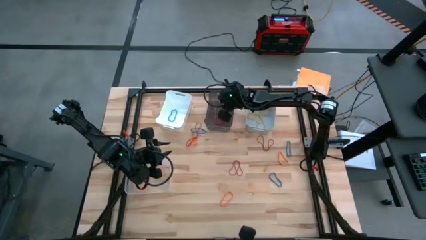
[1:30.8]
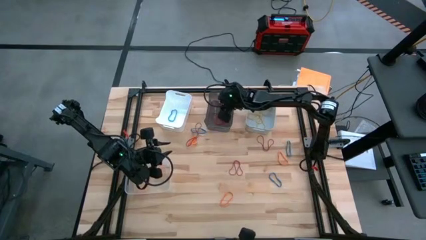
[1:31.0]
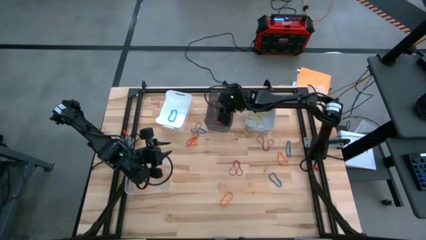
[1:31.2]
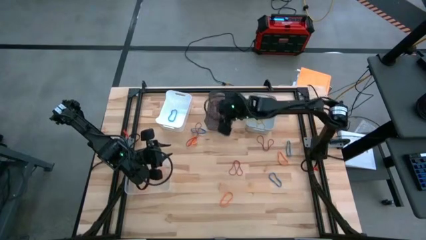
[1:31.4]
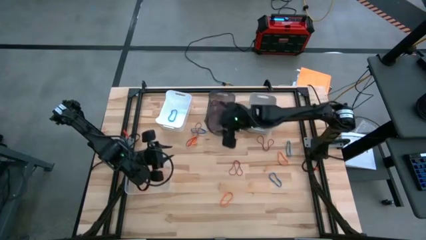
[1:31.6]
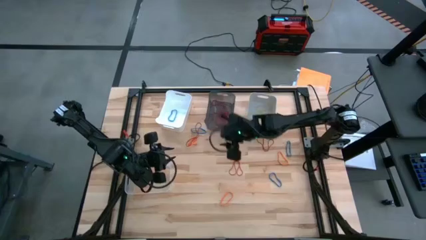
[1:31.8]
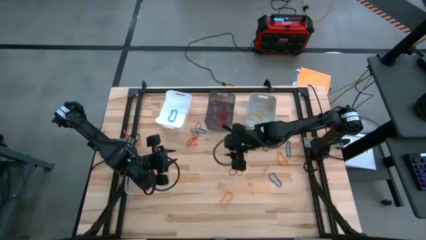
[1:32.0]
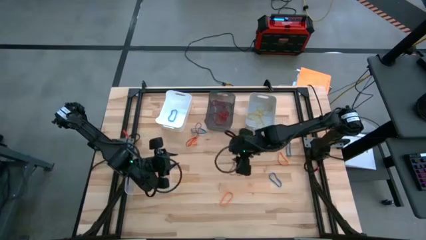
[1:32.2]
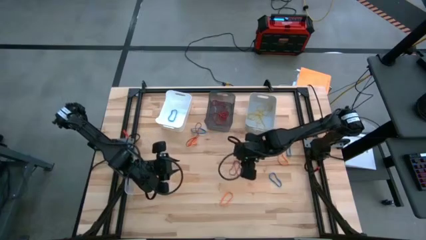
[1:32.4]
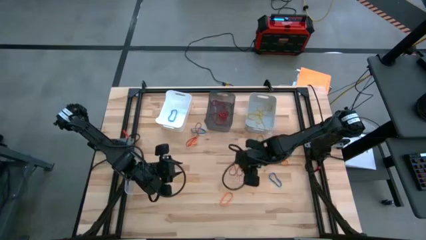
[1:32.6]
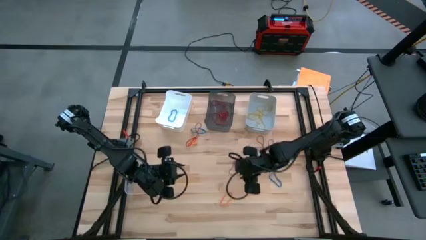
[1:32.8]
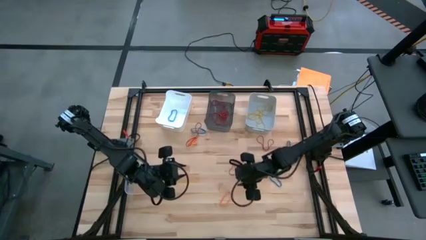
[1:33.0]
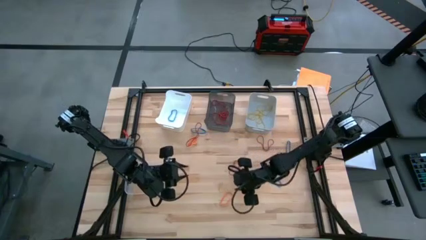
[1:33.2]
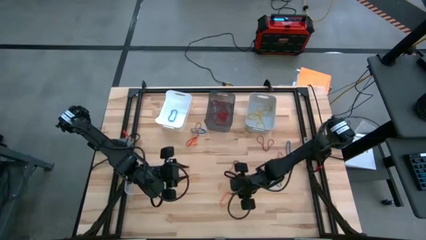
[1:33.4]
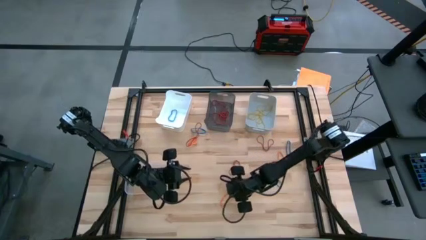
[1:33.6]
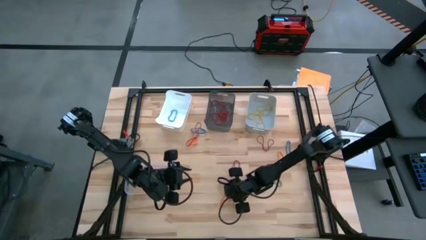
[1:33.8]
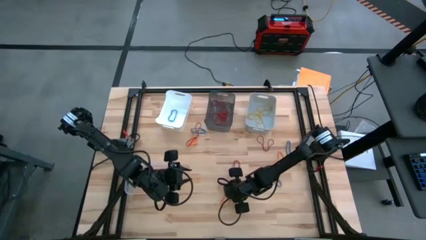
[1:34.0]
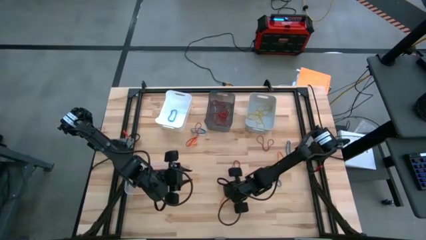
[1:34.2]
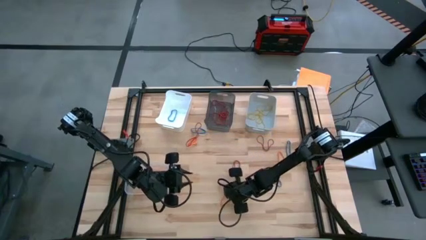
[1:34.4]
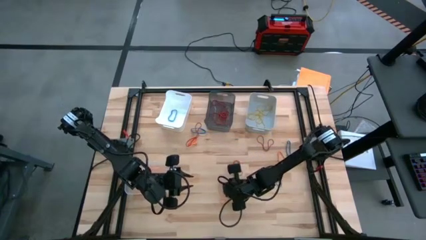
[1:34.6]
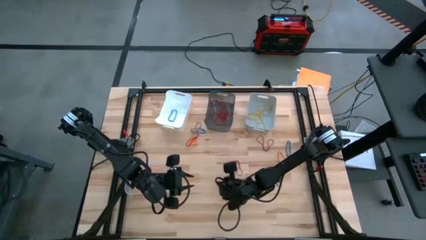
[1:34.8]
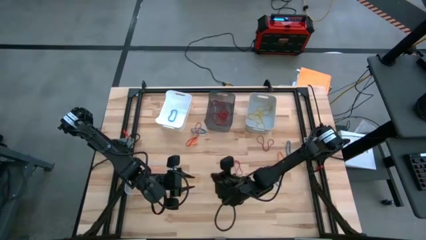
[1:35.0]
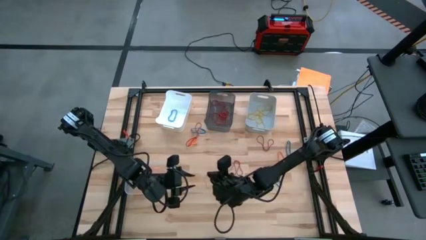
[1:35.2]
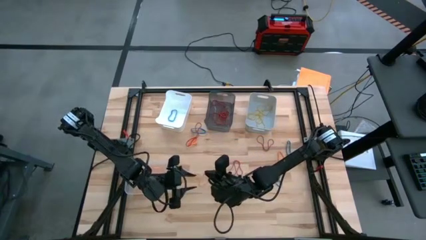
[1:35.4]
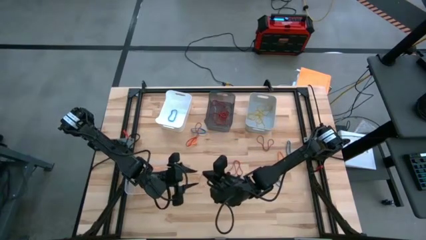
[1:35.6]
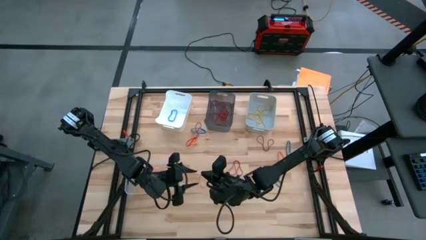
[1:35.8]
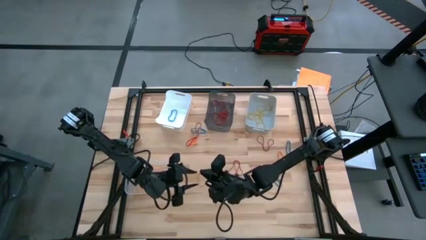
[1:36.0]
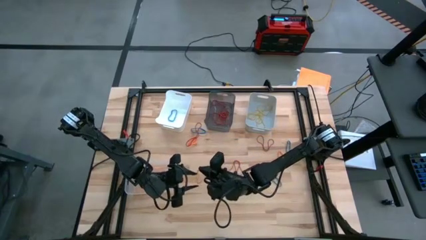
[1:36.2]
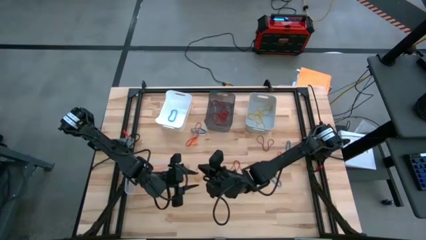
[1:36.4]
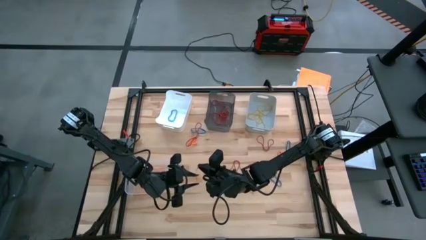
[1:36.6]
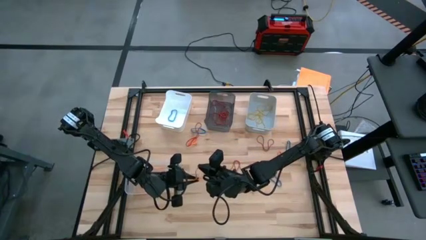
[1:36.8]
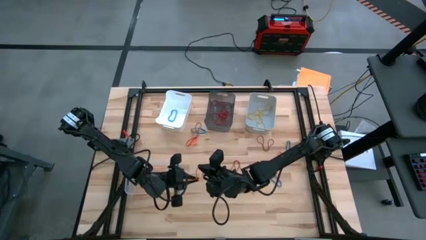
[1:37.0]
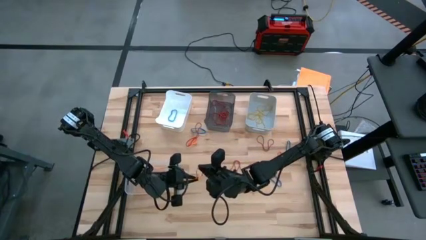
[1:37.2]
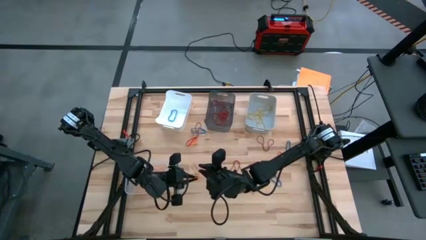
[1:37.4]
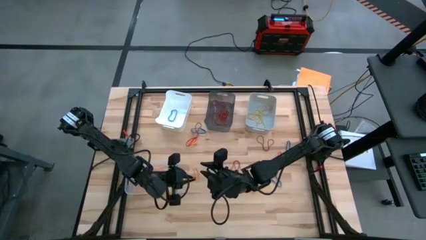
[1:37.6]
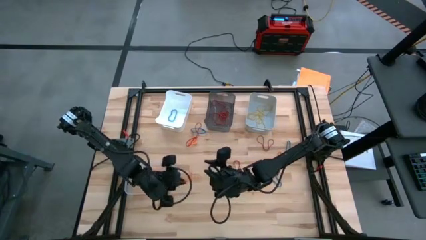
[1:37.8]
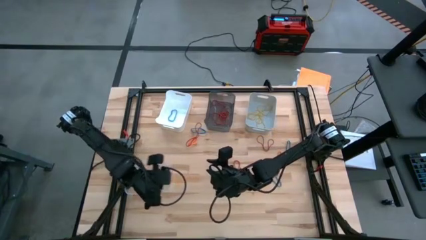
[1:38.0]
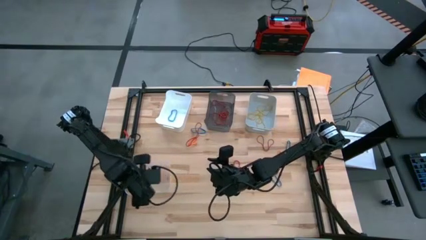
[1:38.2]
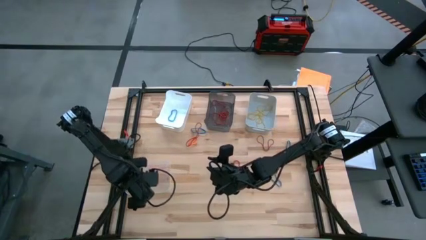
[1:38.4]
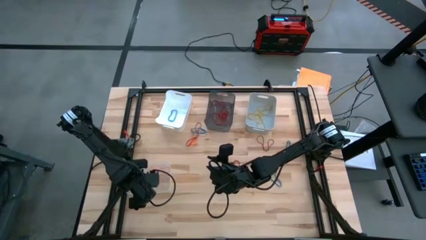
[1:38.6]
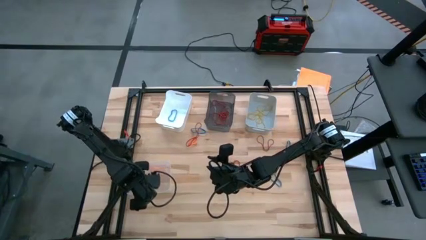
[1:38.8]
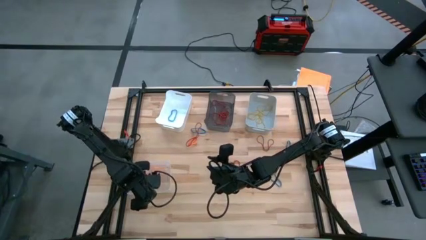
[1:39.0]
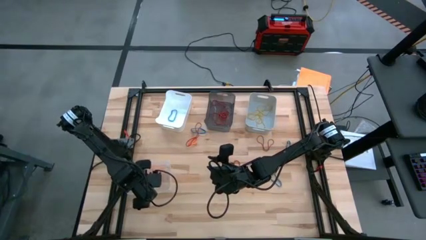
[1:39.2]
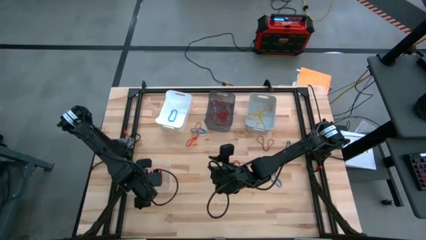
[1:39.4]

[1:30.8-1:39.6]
Task: Sort rubber bands into baskets
Put the orange rubber band into the transparent bin

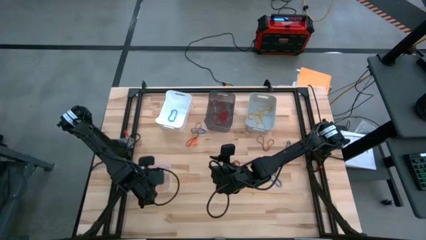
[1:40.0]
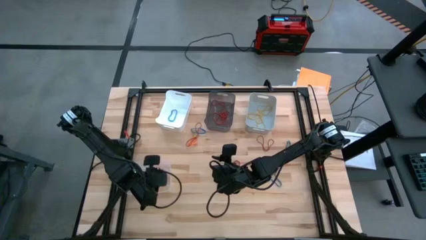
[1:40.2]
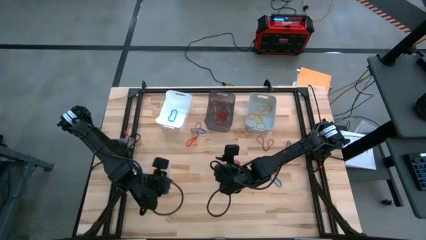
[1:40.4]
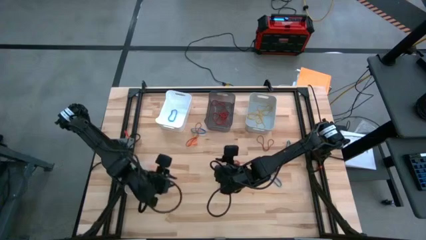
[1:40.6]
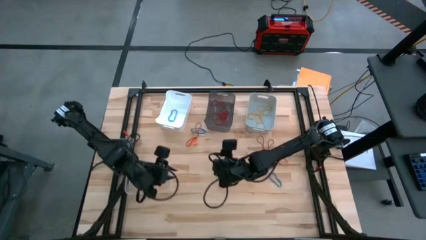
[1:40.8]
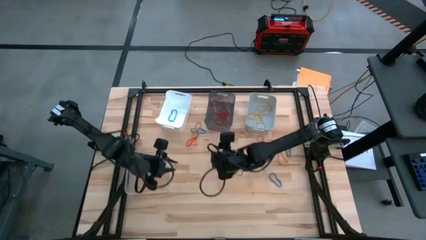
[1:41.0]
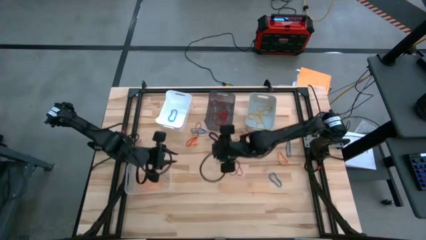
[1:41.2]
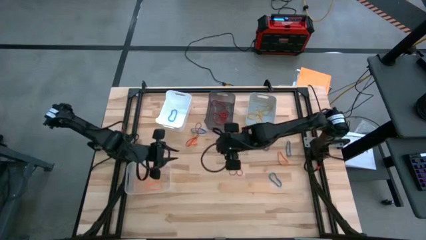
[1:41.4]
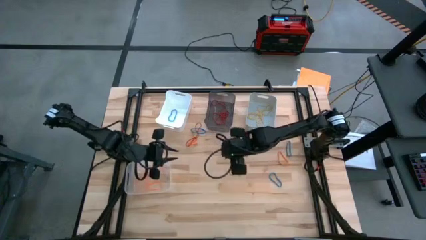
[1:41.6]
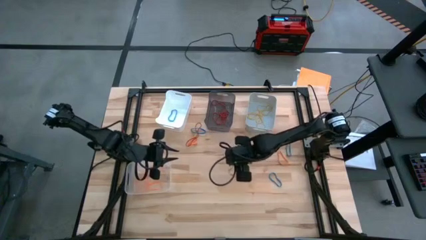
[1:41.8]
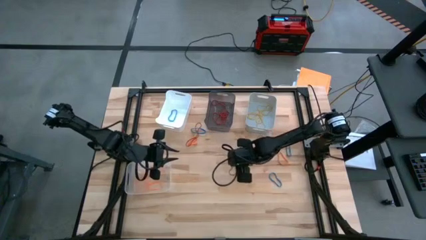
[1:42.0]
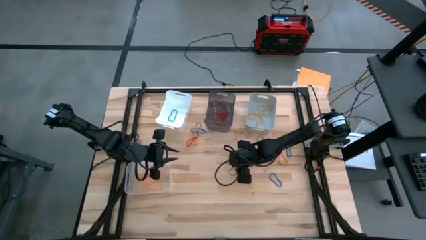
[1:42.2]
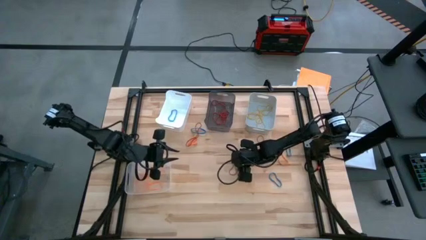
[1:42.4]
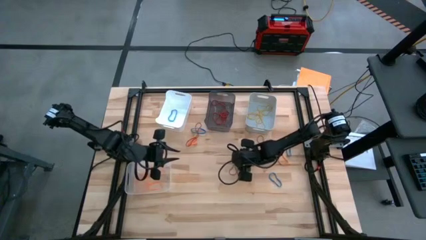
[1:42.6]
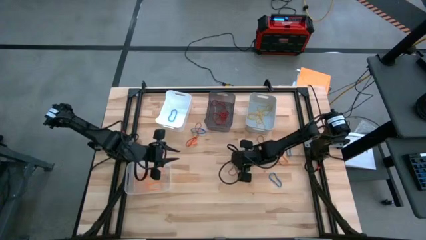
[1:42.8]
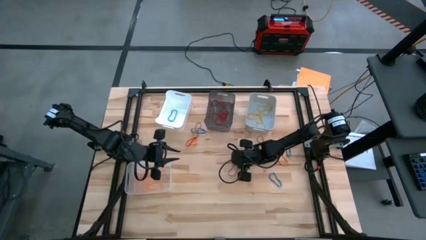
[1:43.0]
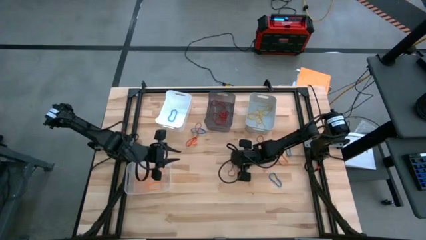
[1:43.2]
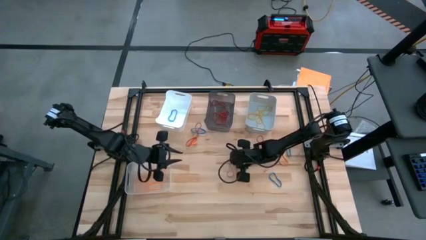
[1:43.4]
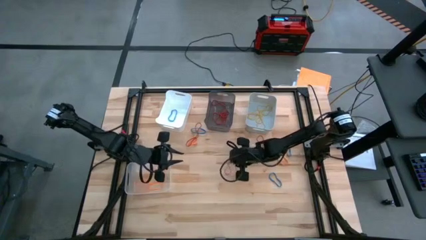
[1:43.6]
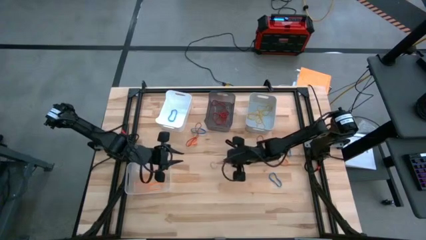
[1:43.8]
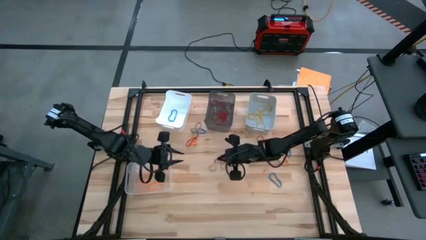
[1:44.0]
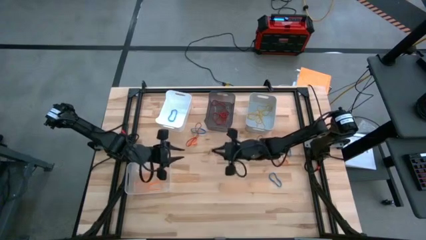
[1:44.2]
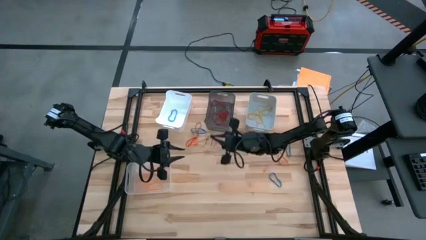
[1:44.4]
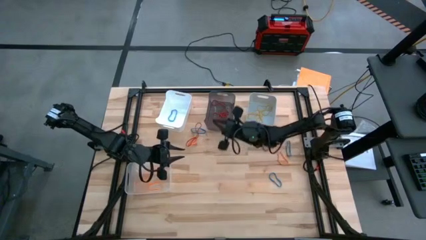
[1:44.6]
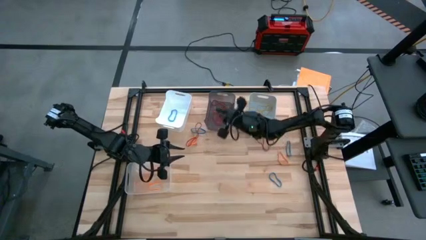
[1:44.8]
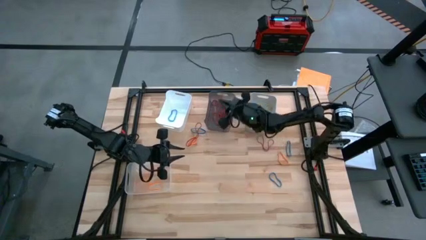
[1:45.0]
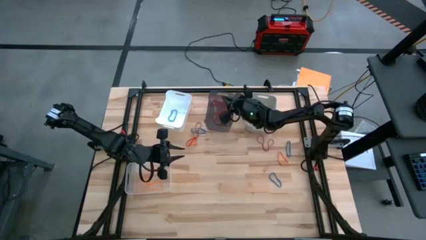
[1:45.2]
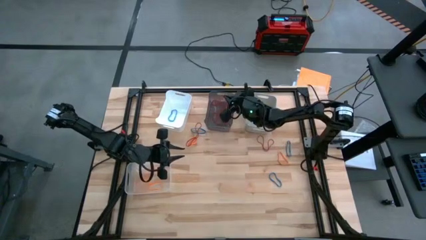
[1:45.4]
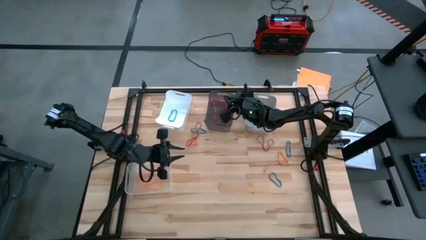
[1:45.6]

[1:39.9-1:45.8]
Put the red rubber band into the black bin

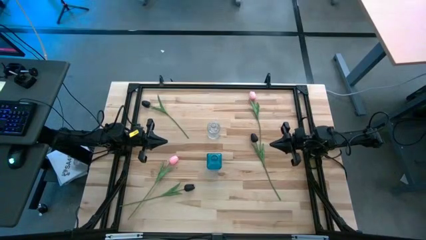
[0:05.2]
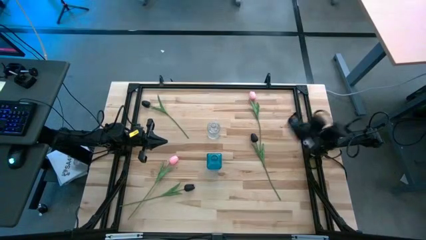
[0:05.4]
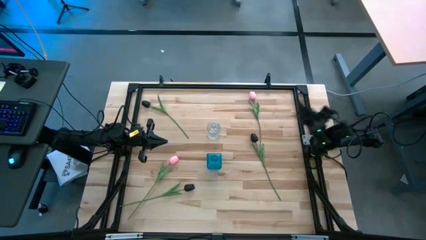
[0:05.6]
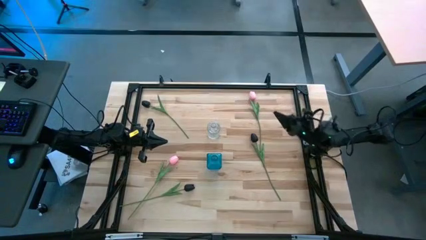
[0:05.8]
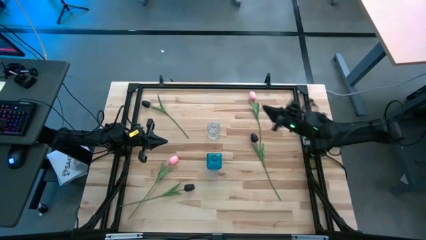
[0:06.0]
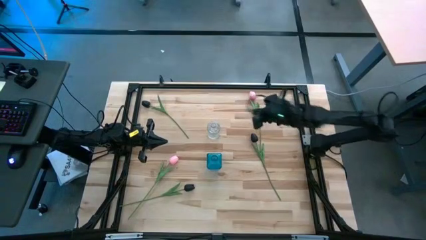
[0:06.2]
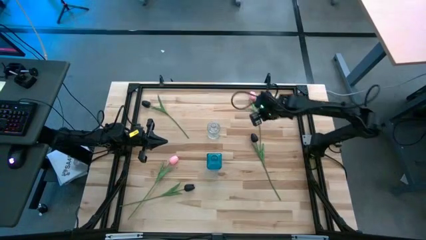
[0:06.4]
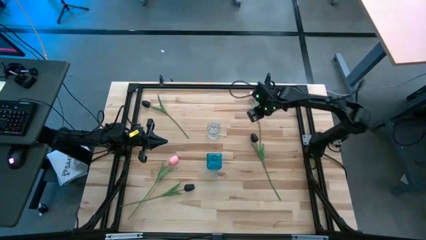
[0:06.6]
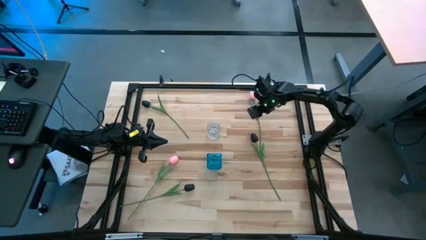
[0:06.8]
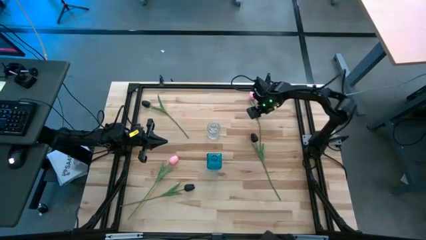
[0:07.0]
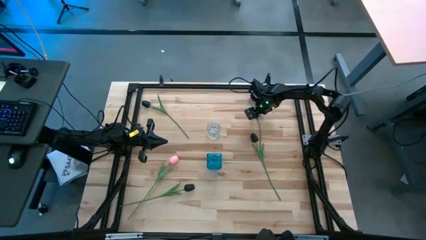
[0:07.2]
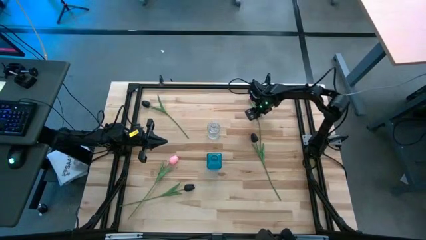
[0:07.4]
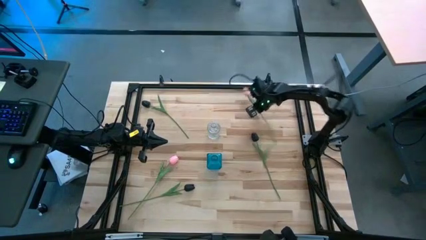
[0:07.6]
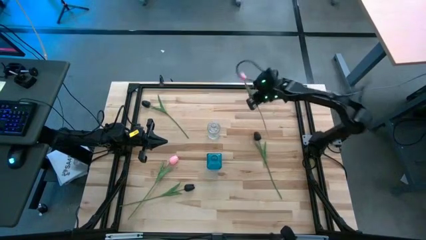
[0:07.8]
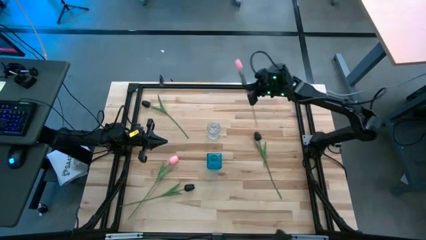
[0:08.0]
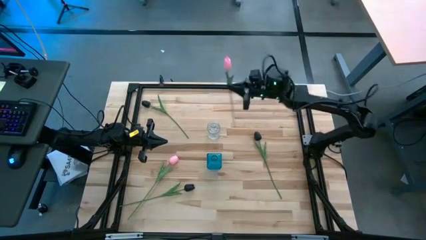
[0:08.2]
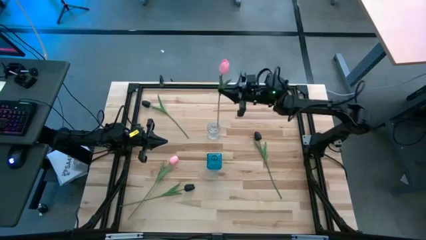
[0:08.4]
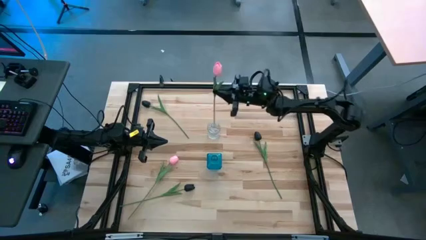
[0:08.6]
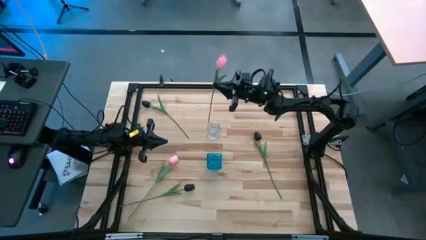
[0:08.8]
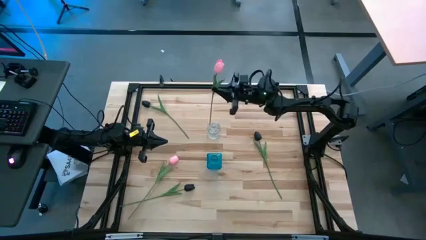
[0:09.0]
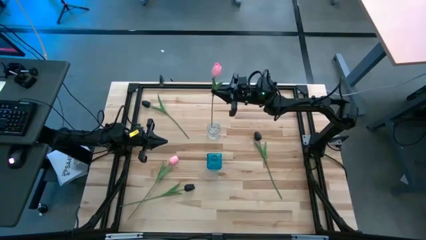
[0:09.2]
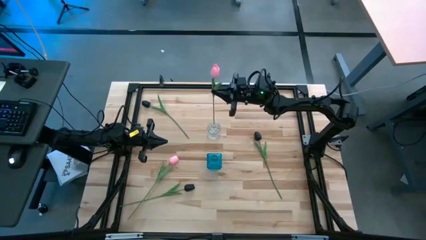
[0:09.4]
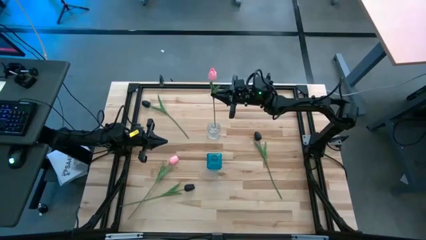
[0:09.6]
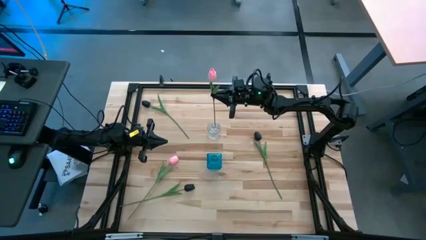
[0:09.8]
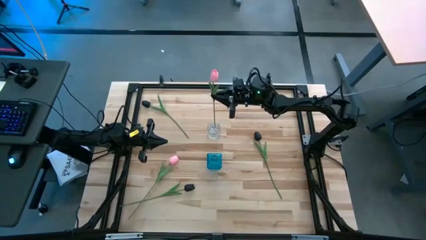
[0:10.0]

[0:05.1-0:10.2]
Task: Sort flowers into vase by color
Put the top pink tulip into the transparent vase
